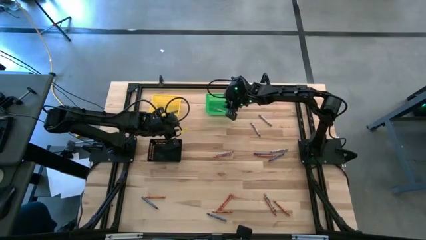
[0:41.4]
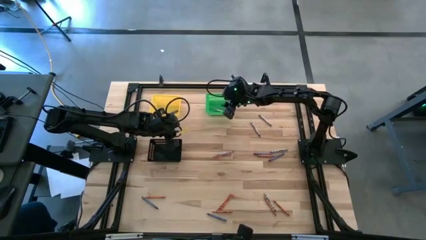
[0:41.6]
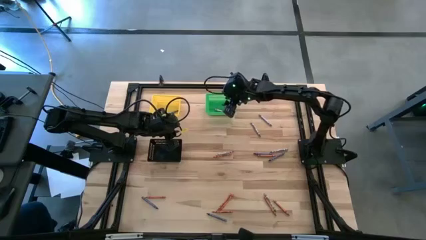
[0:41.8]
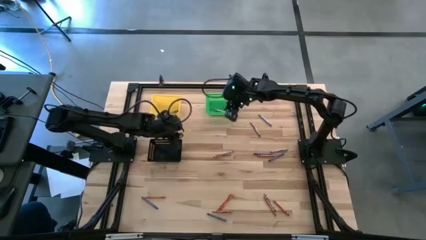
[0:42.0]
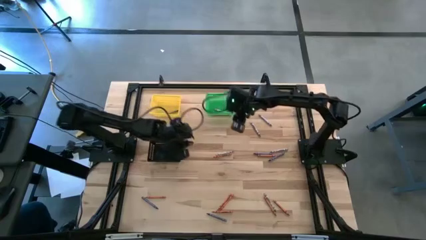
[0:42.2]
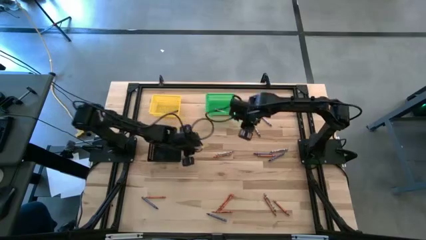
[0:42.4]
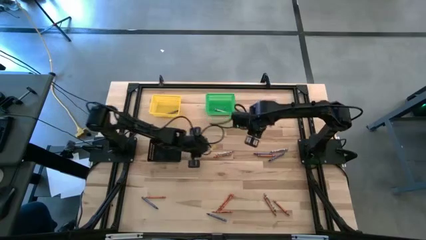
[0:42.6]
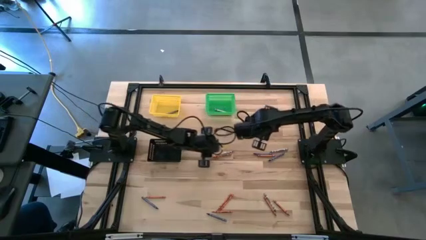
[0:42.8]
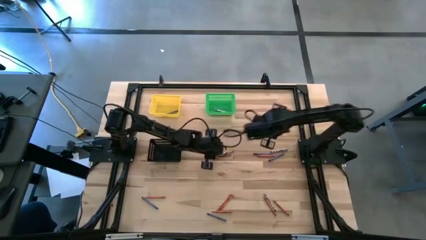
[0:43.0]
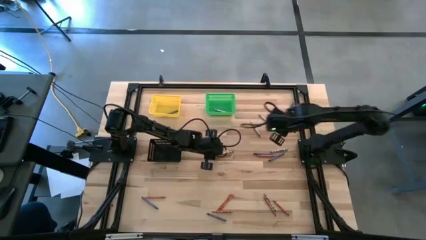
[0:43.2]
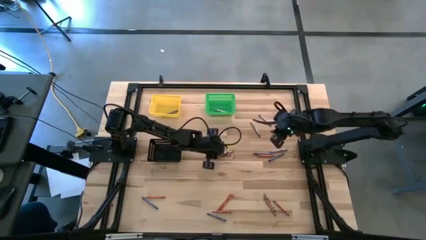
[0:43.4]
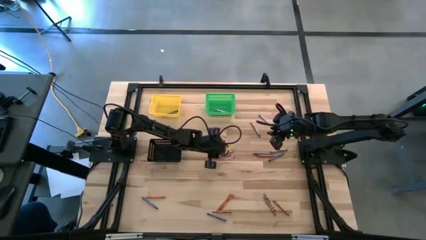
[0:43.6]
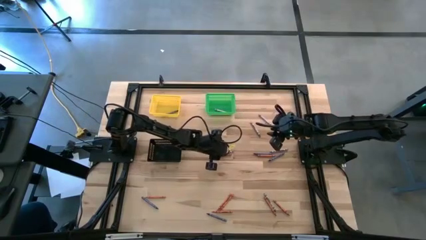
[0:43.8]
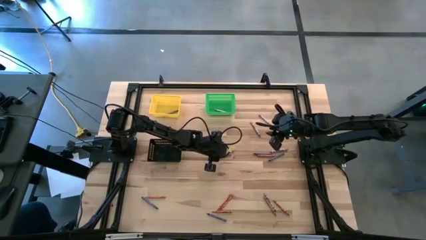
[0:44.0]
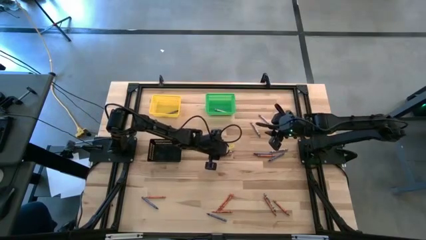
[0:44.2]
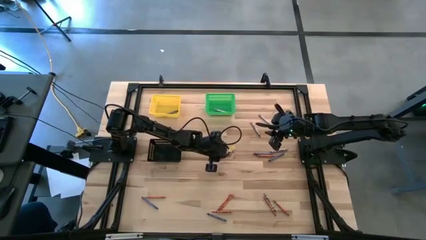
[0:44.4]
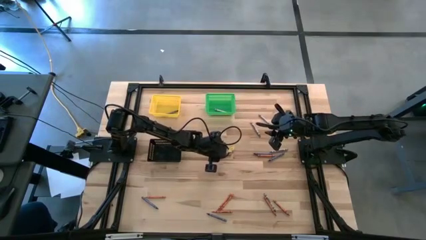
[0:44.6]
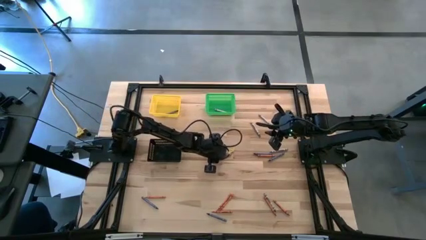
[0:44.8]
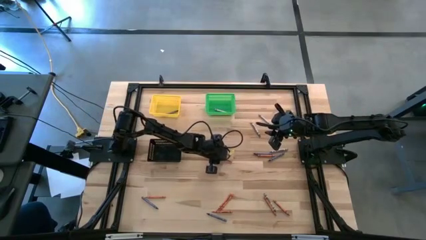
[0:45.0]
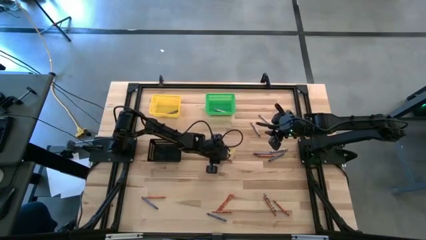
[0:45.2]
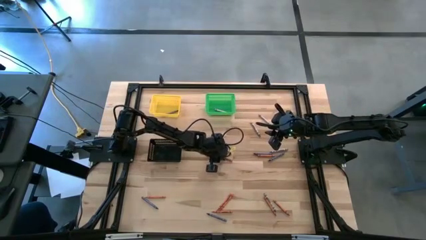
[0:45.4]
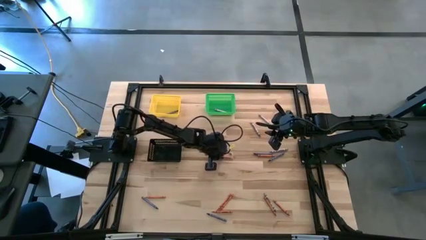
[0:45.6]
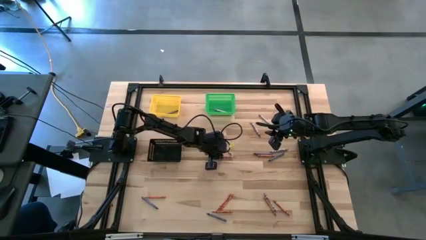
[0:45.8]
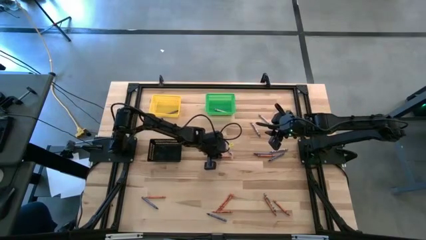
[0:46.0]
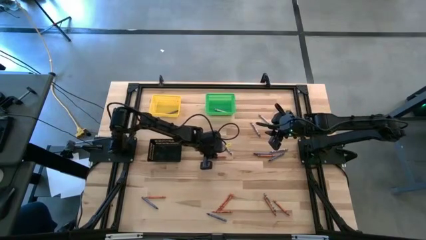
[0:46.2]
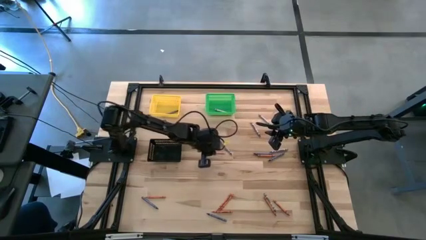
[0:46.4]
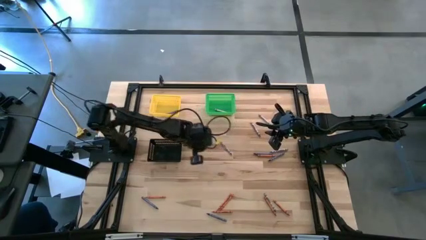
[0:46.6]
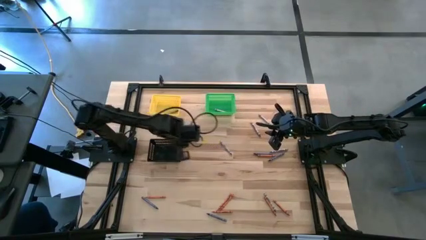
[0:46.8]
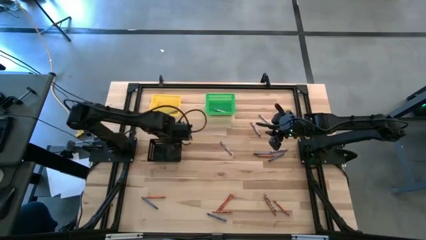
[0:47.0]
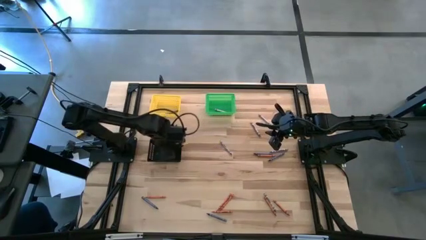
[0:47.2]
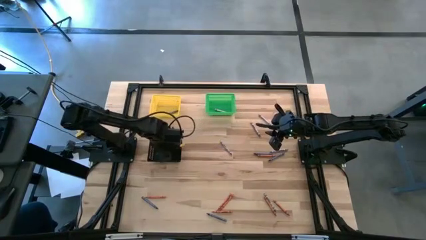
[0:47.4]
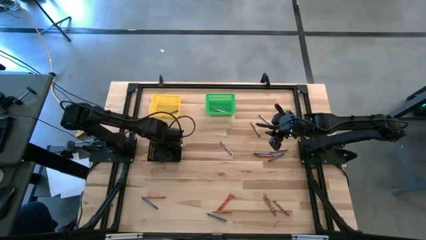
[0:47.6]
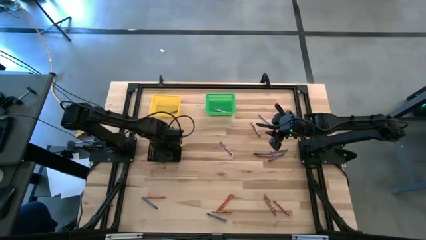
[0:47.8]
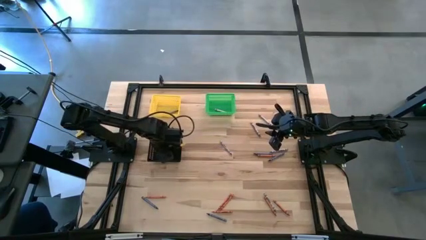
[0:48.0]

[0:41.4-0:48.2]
Task: Sort crayons
Put the orange crayon into the black bin

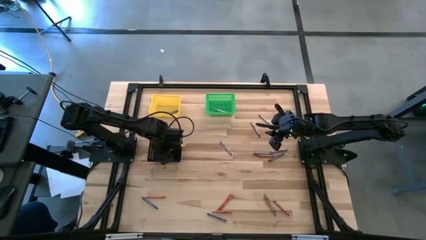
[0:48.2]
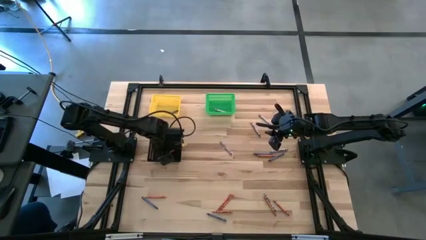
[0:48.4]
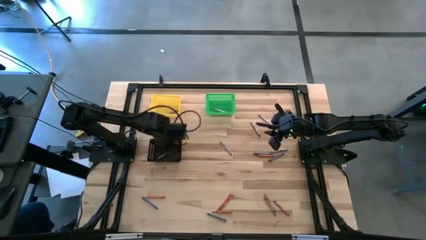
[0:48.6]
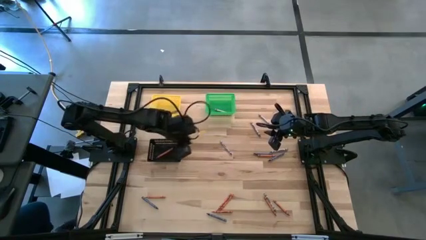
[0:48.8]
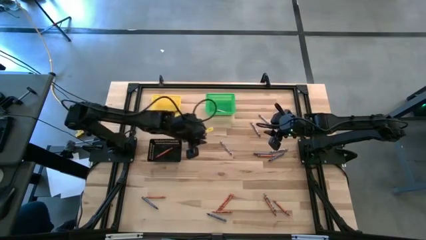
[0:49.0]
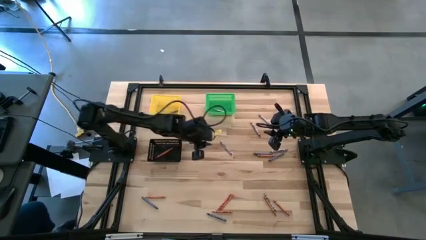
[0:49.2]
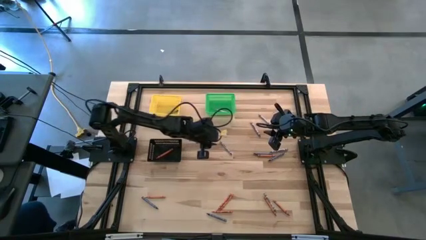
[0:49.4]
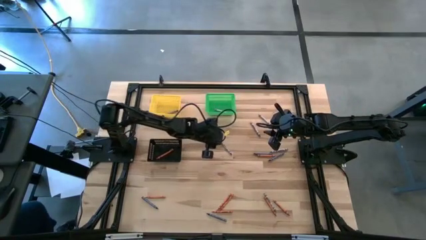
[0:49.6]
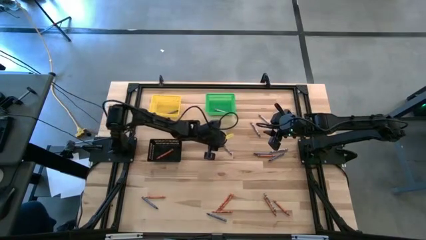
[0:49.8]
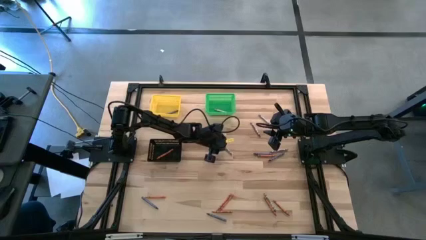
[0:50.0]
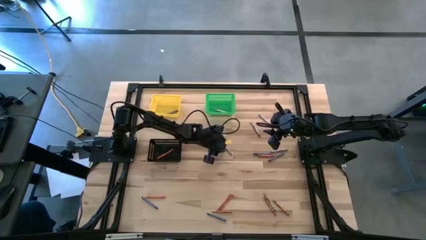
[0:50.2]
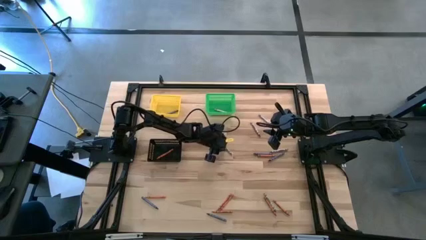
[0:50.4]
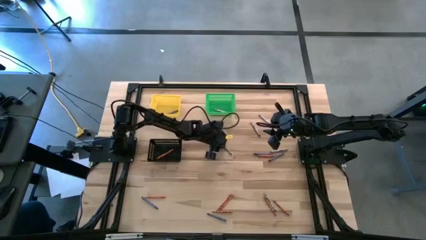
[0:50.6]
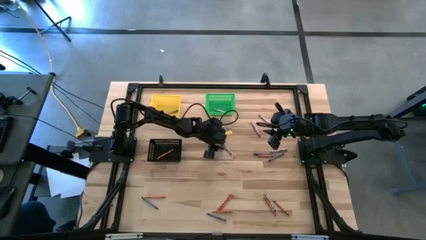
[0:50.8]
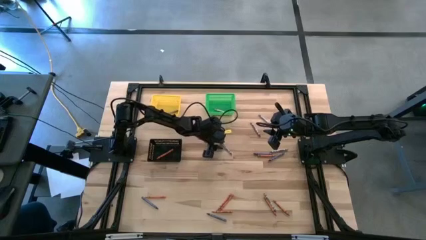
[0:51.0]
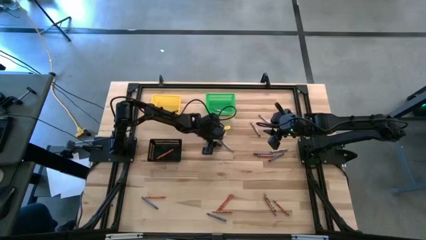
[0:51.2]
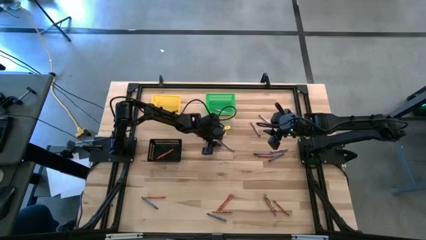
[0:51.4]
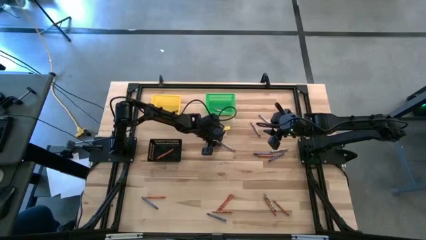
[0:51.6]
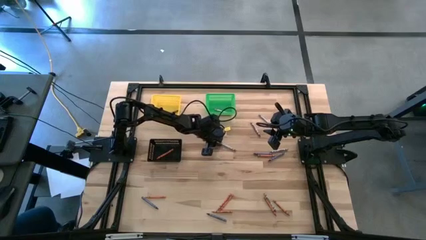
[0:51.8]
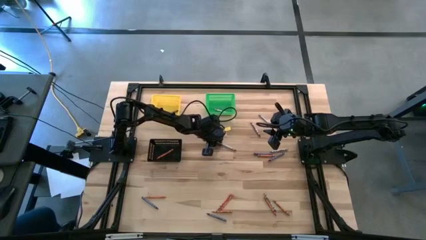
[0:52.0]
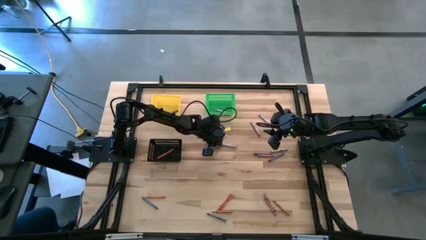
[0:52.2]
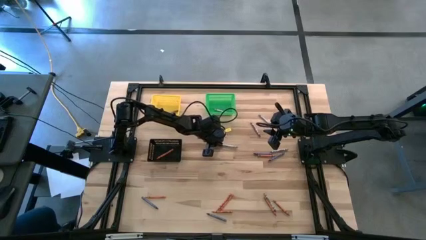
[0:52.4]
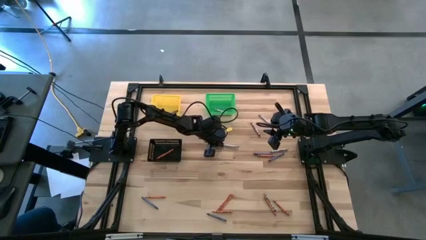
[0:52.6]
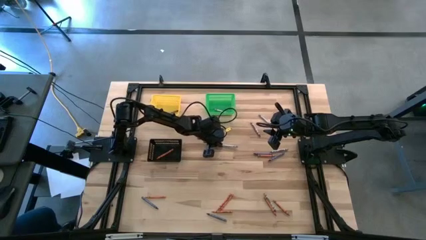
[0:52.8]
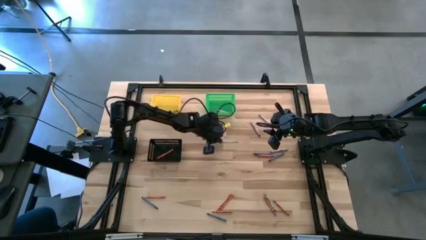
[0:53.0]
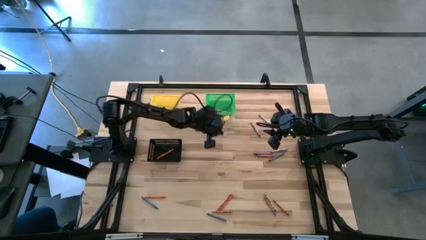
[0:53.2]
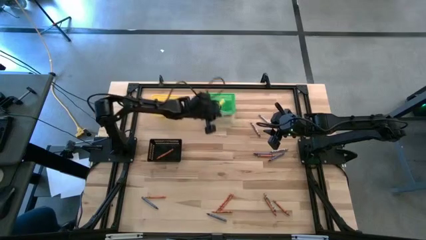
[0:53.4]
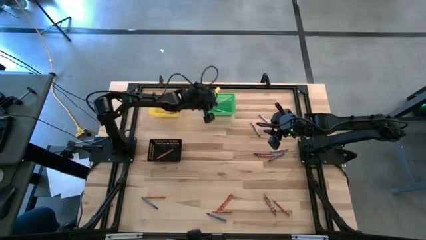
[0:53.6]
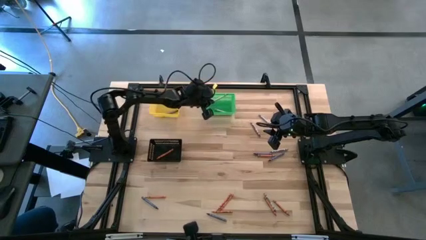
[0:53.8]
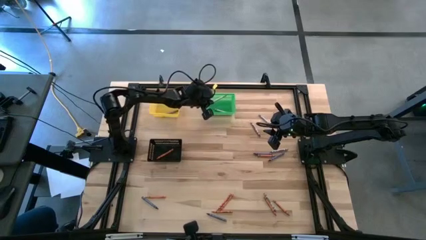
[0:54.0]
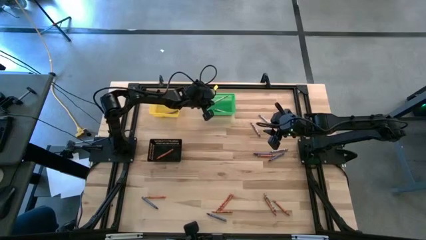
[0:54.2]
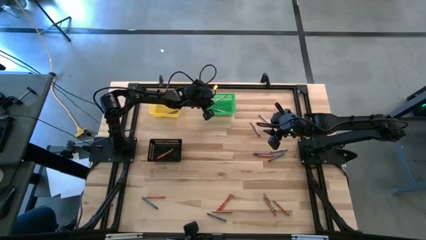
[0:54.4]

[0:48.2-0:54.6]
Put the gray crayon into the green bin

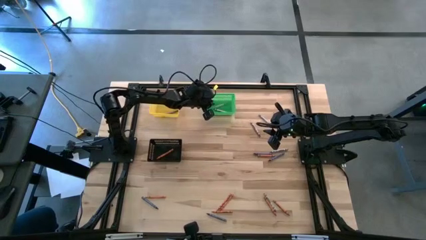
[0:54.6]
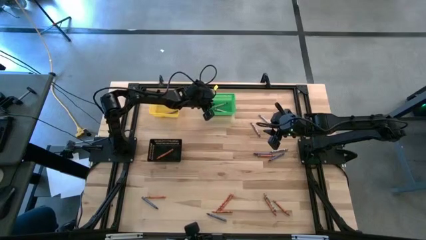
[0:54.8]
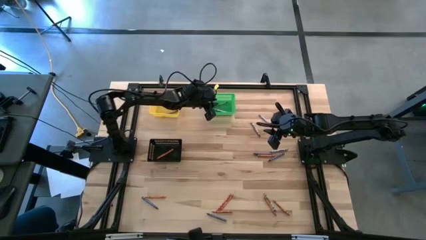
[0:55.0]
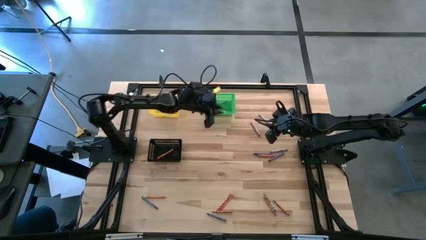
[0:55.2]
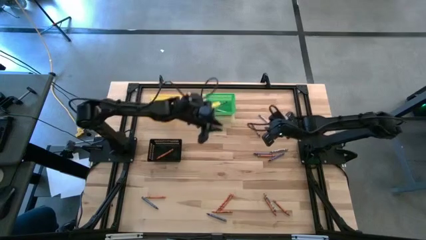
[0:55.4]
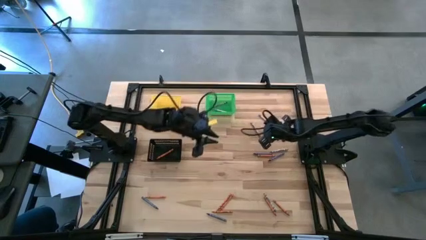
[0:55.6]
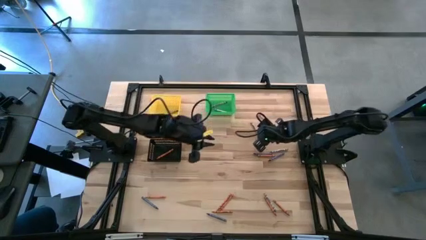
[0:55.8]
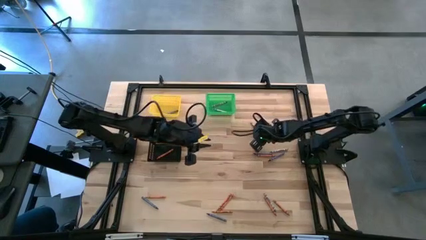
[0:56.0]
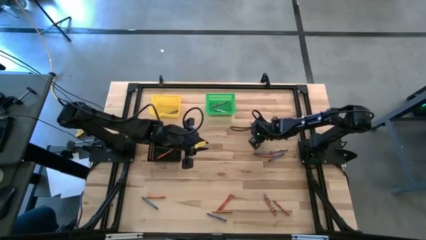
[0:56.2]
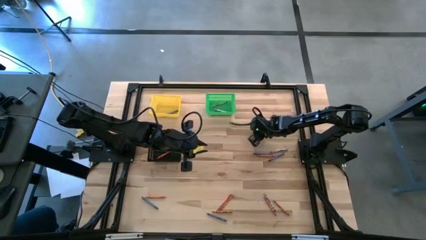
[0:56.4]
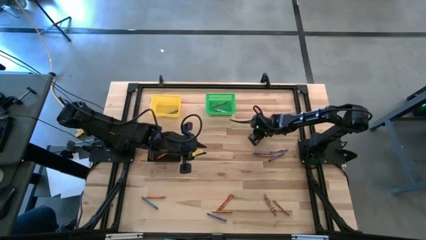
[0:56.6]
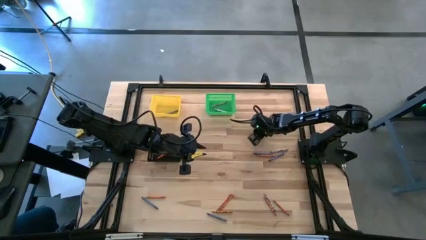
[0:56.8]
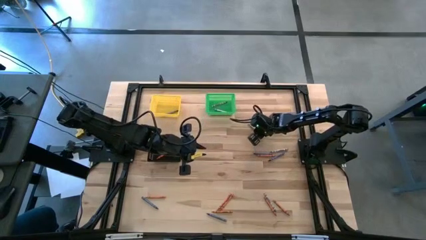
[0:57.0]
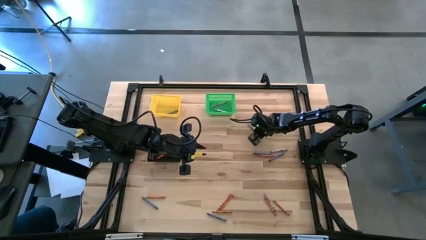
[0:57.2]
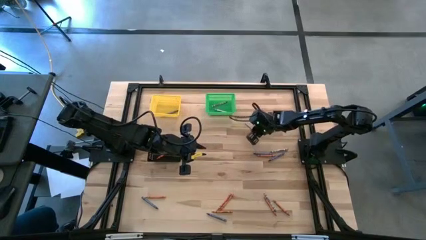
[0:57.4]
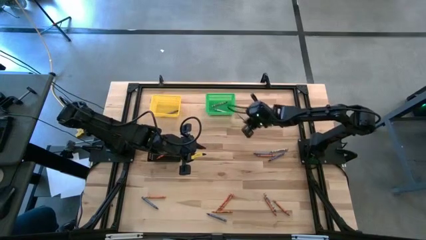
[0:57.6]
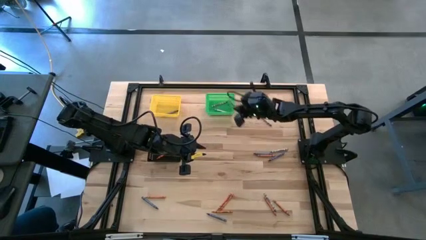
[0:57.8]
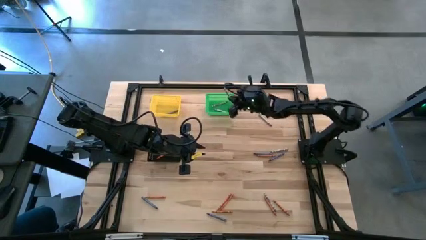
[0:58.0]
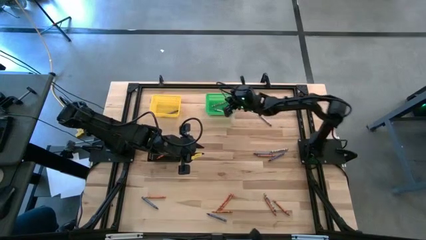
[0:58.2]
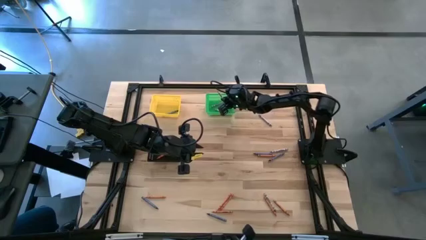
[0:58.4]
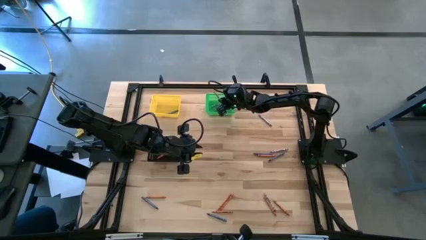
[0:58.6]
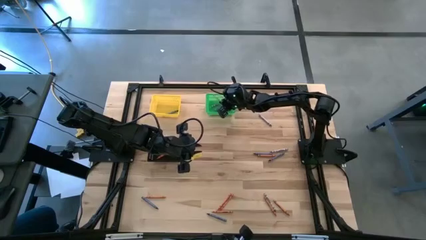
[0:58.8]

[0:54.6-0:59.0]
Put the gray crayon into the green bin
